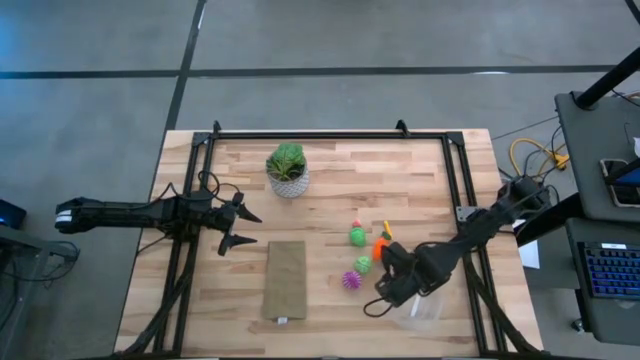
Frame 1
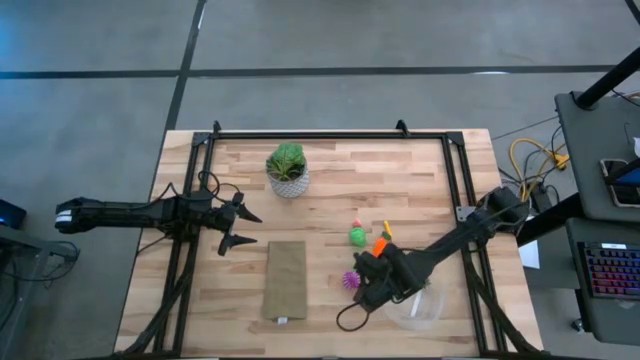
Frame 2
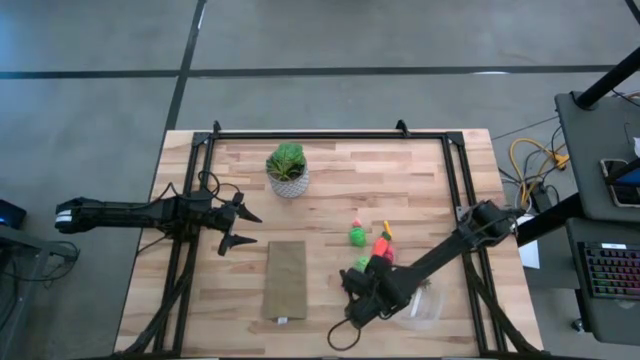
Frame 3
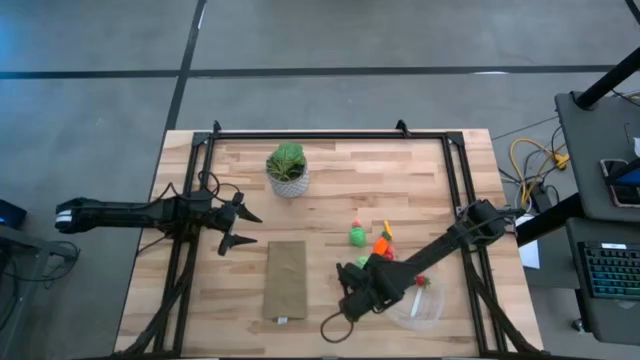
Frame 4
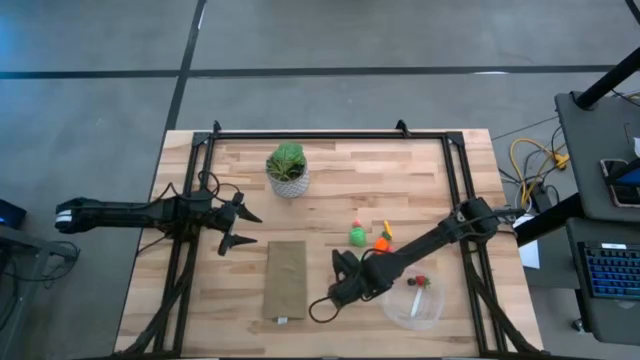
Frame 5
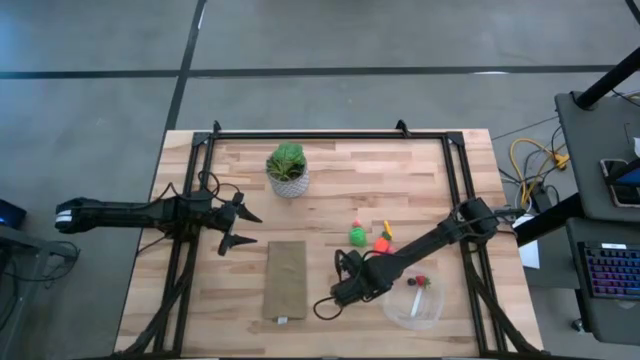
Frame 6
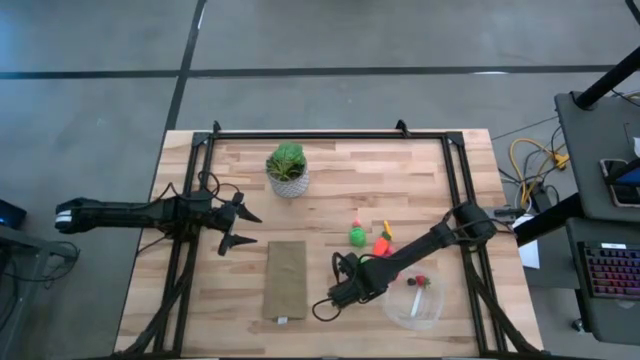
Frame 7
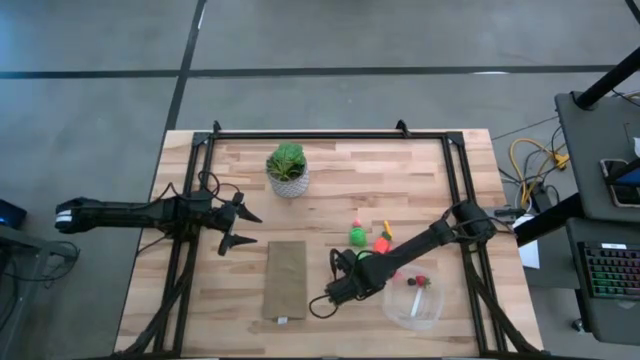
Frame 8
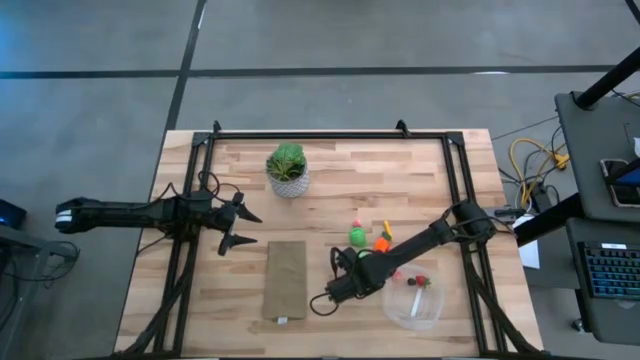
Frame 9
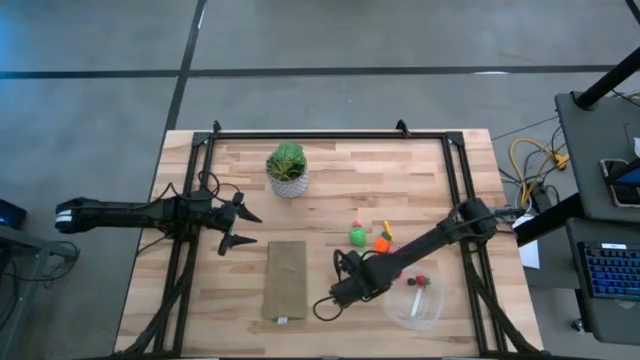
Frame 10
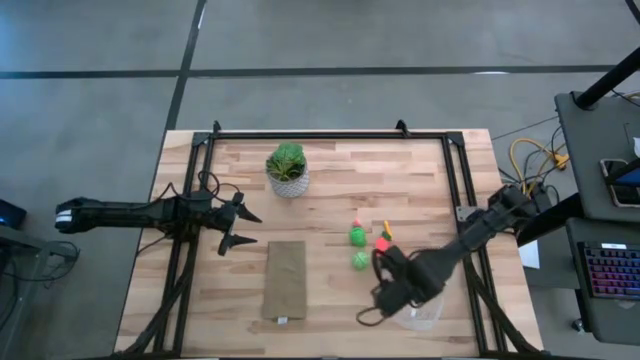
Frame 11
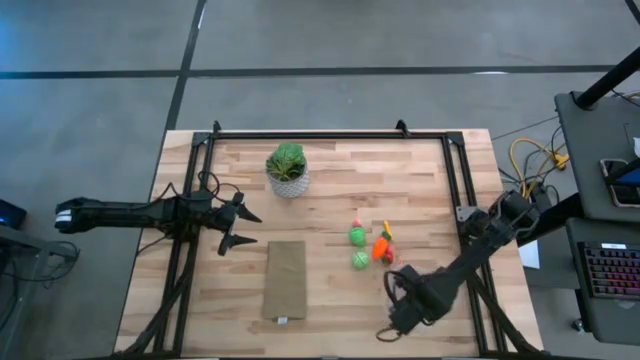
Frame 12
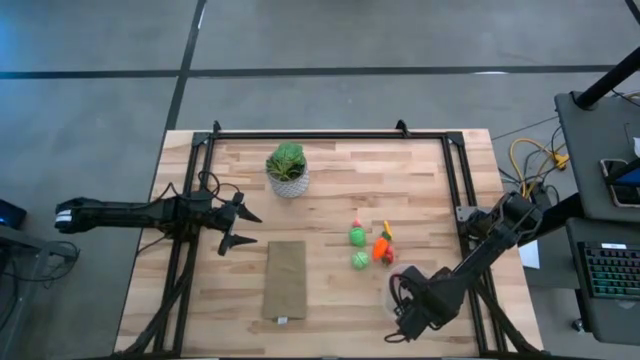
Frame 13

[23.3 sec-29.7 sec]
Task: Pick and placing Produce into tupperware
Put the onion into the transparent container

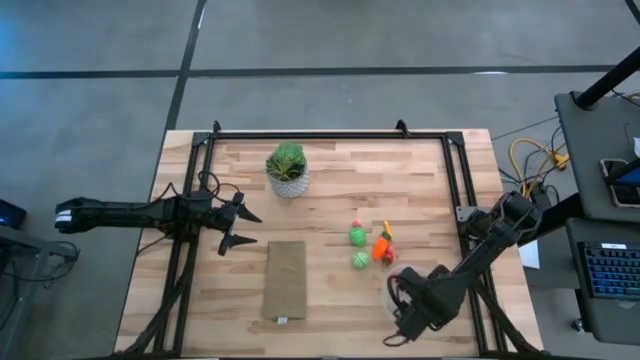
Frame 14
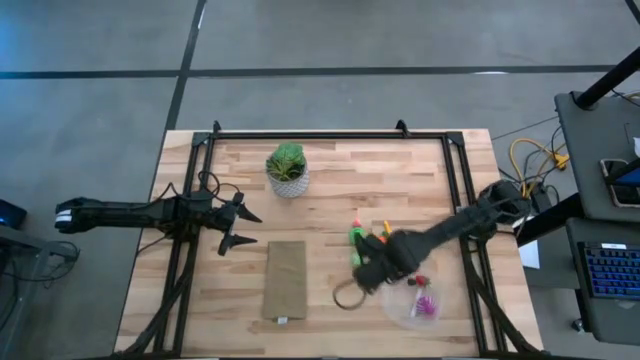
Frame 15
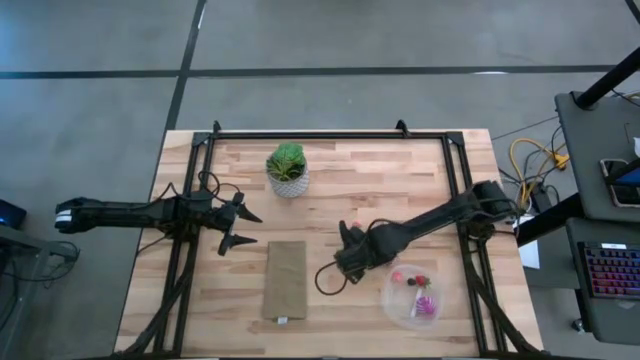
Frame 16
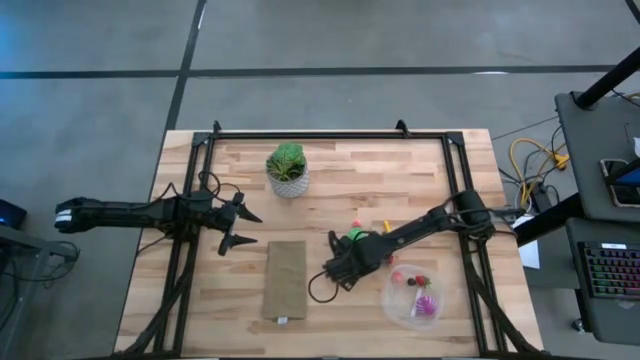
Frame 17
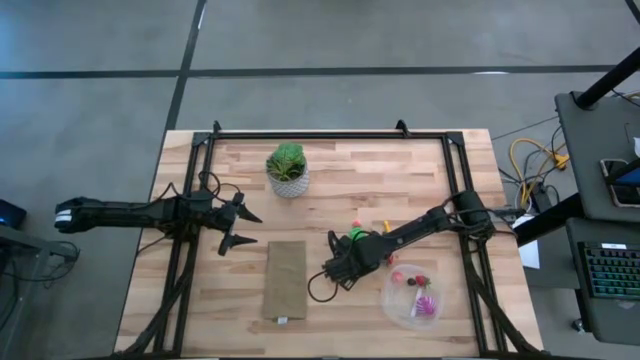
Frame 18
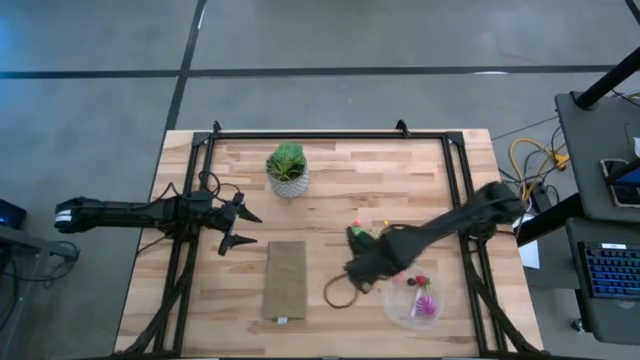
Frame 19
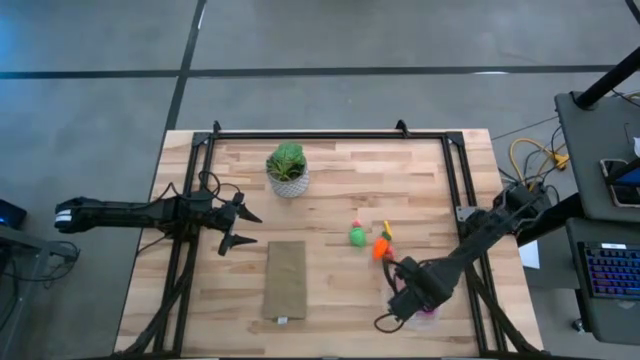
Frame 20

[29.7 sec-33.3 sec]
Put the cabbage into the transparent container

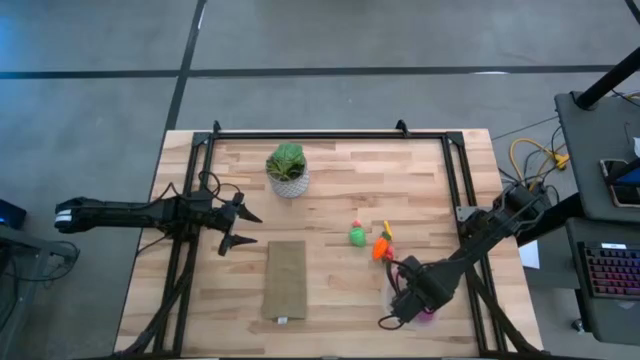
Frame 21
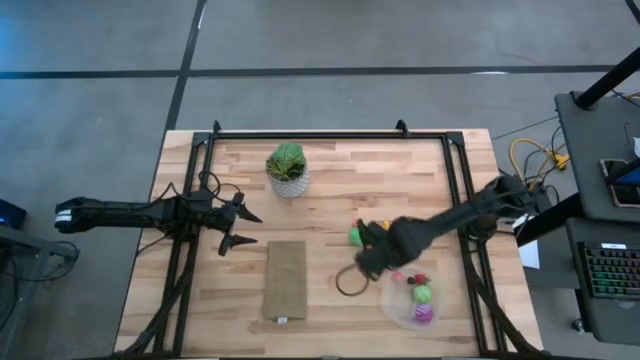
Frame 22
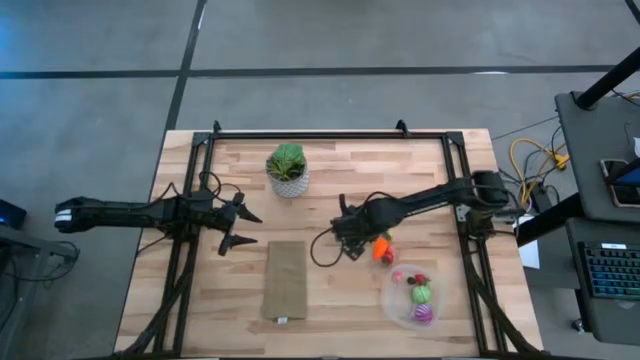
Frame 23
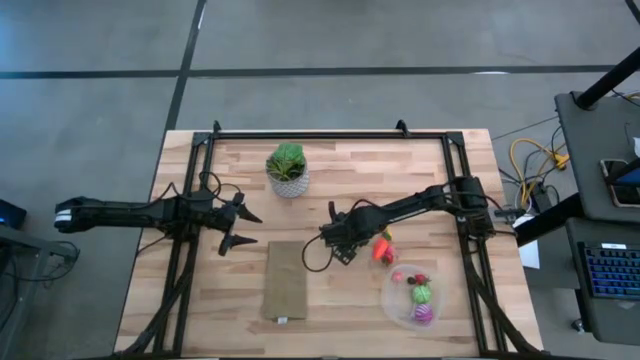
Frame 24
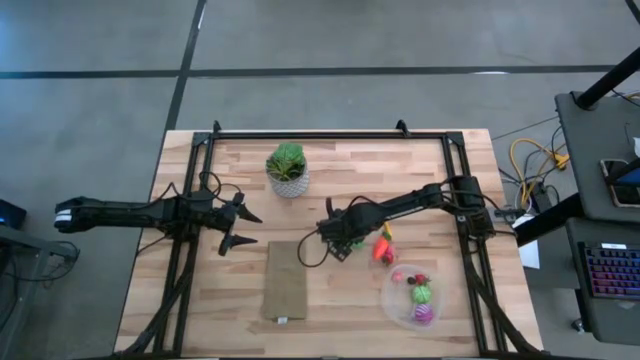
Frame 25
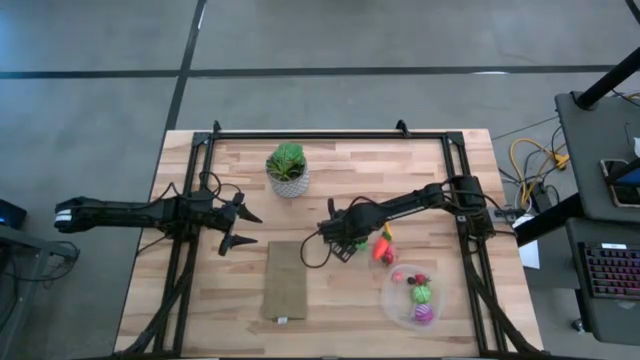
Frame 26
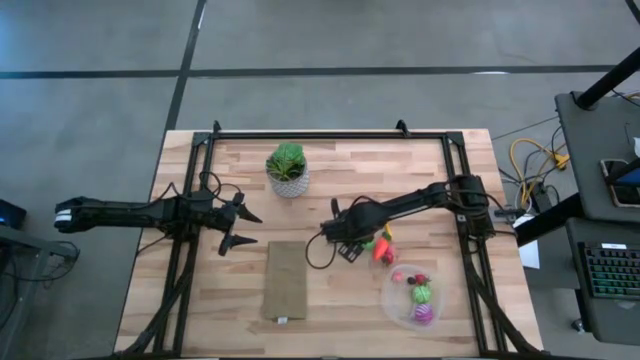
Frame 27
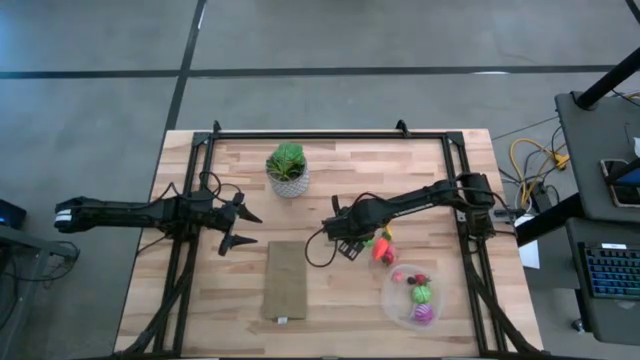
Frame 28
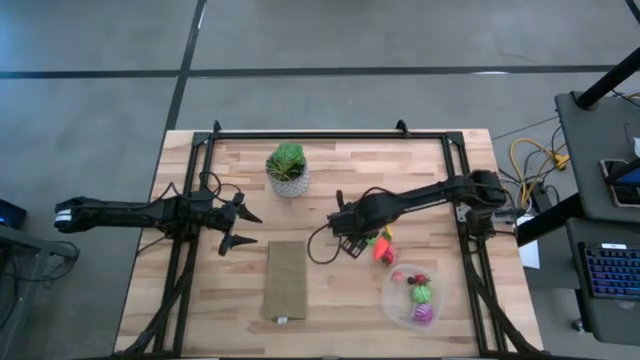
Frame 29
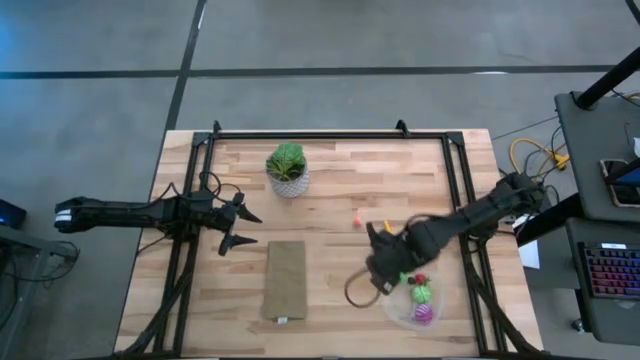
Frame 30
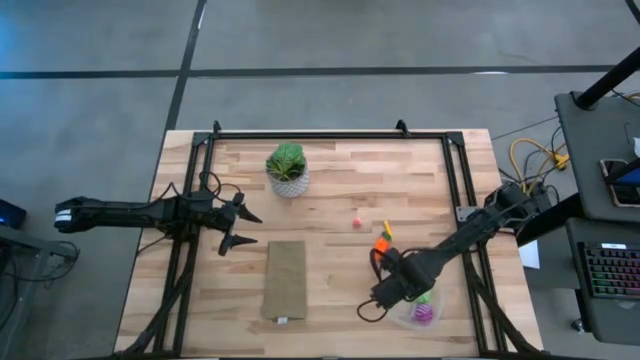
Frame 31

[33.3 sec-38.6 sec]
Put the apple into the transparent container

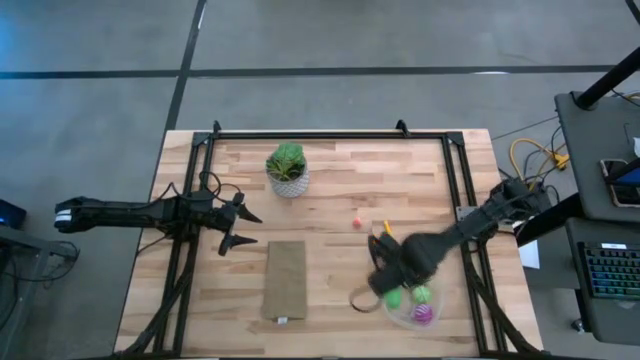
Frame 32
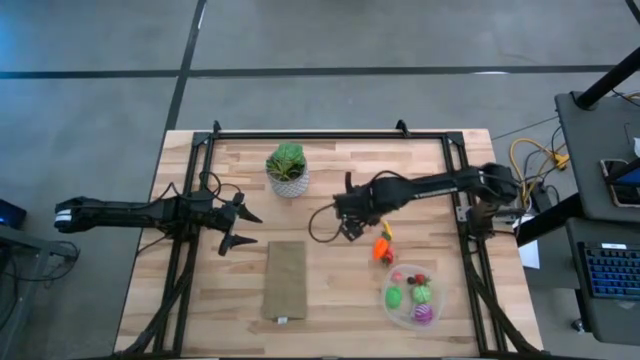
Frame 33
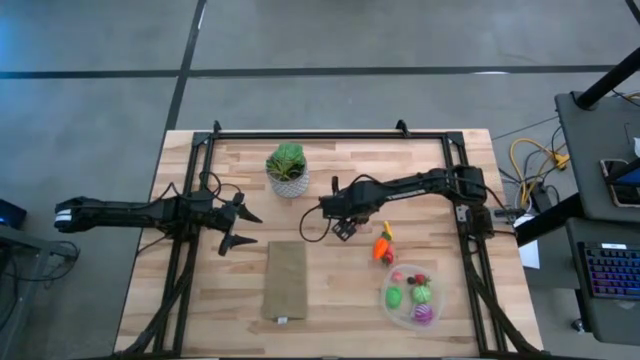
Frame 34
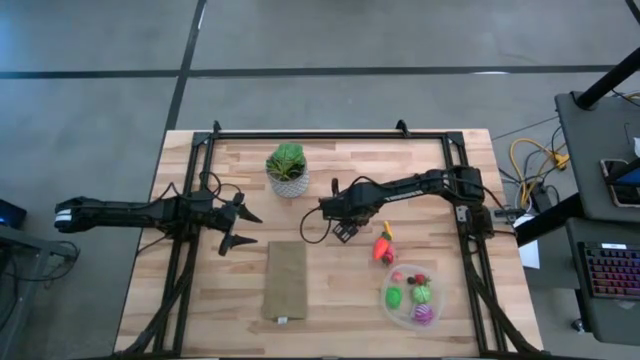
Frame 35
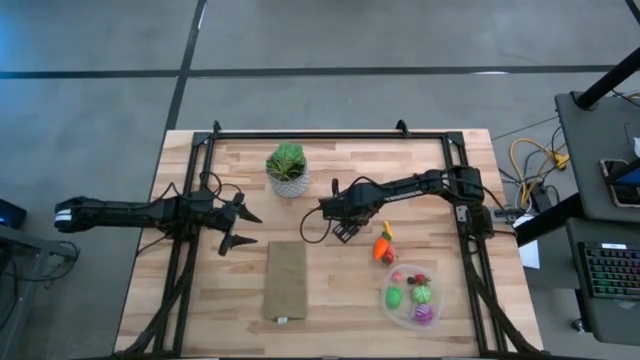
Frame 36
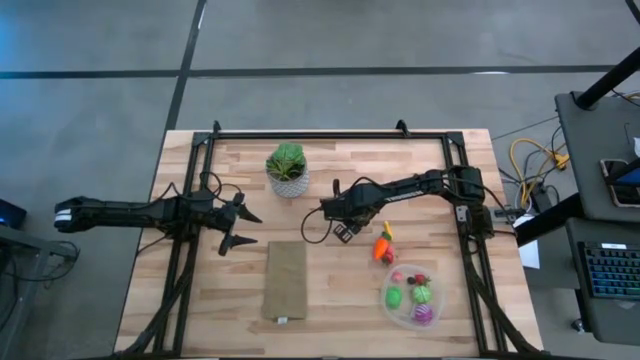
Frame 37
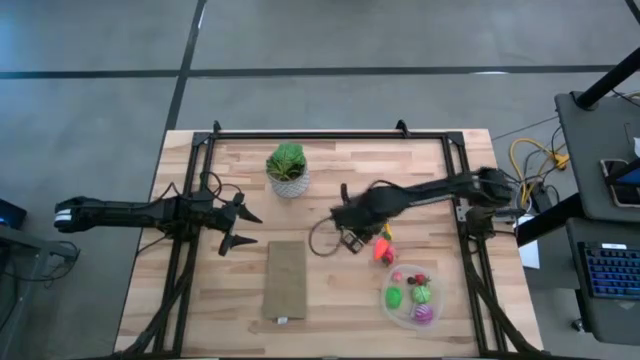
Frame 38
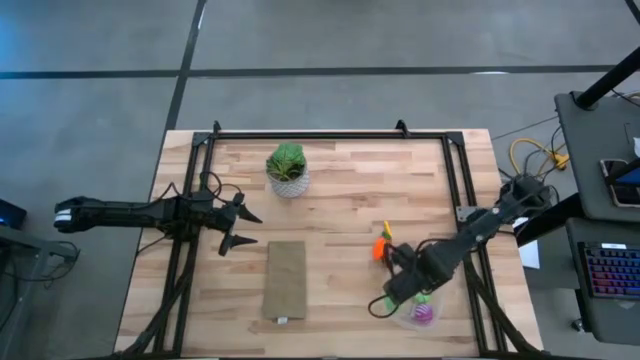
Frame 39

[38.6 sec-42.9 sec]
Put the top peach into the transparent container

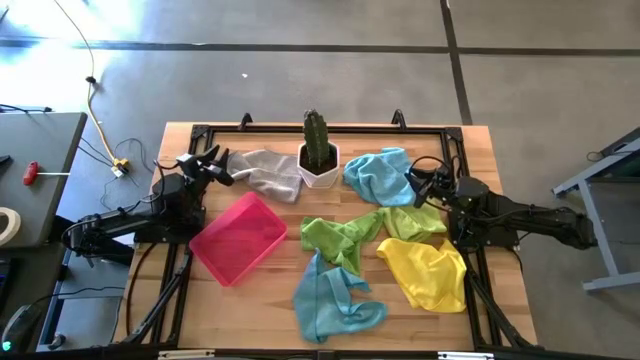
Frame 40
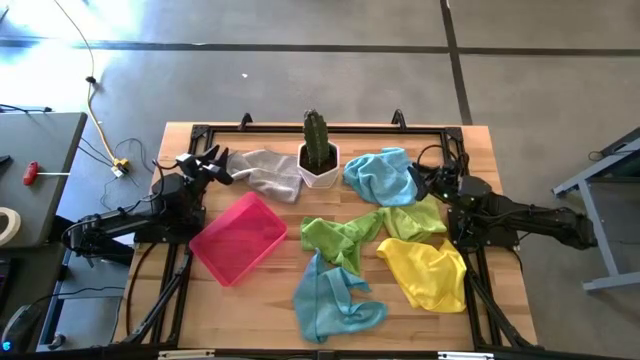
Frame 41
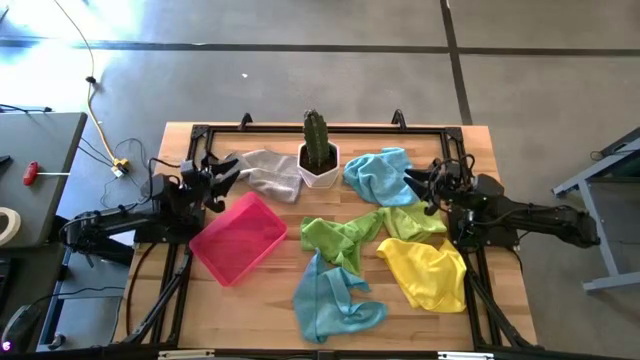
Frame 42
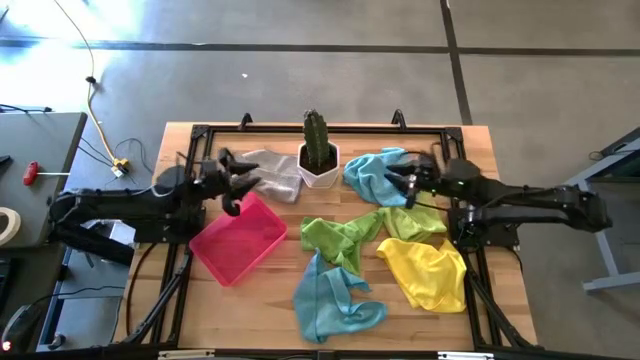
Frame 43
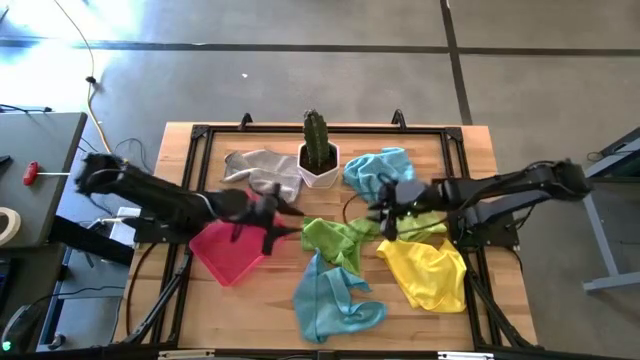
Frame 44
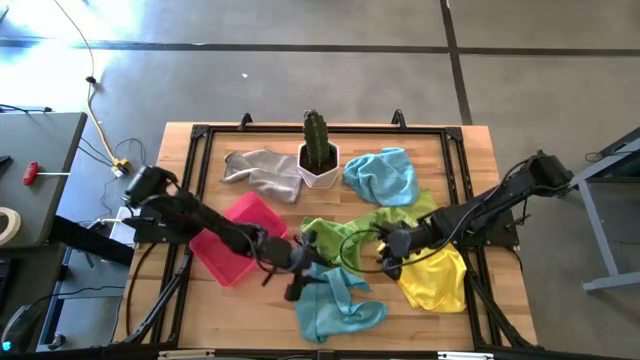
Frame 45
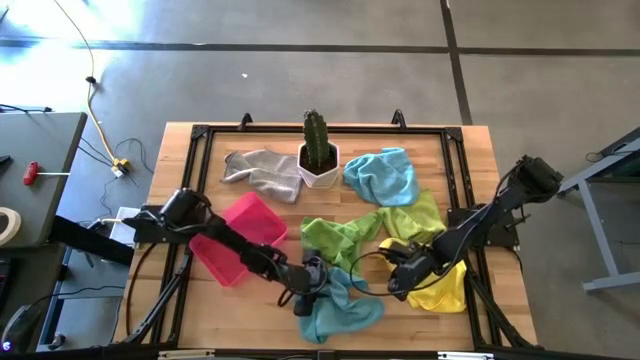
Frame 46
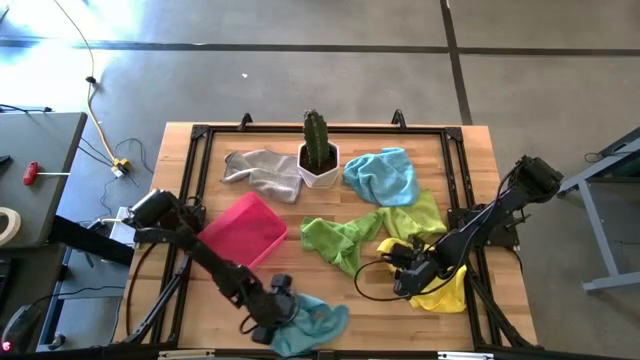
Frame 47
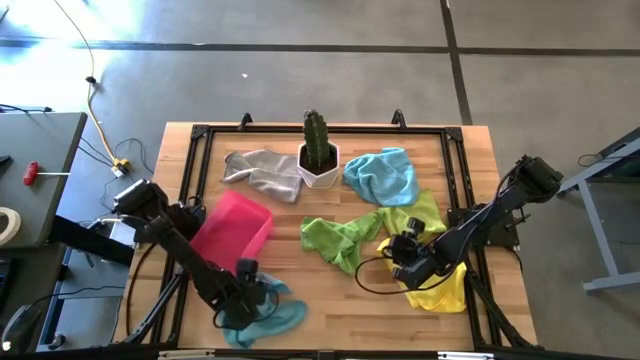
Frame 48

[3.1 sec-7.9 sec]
Task: Fold microfiber towels
Move the bottom blue towel to the bottom left of the table
